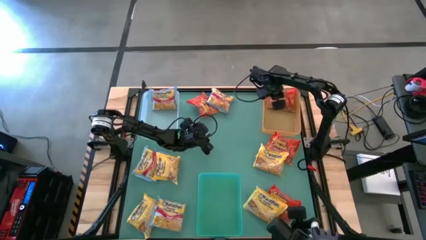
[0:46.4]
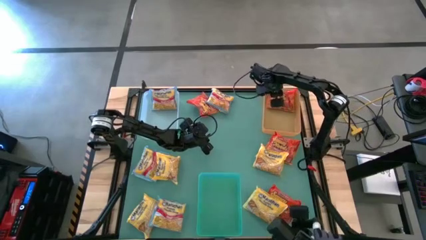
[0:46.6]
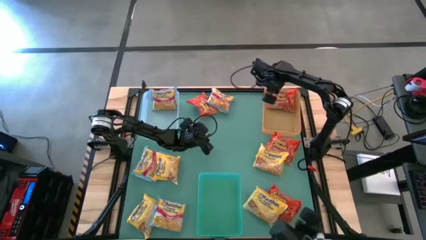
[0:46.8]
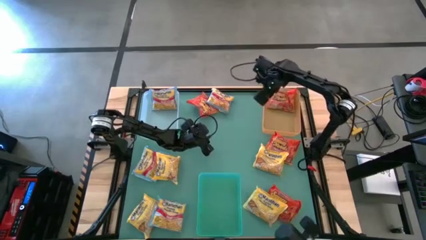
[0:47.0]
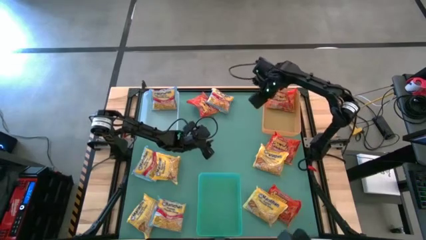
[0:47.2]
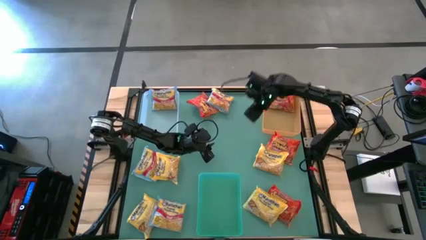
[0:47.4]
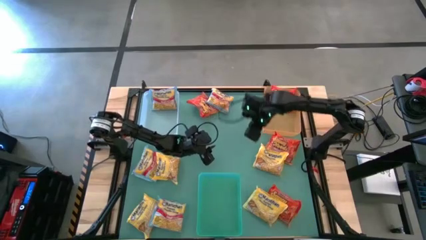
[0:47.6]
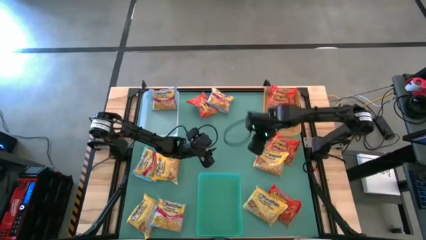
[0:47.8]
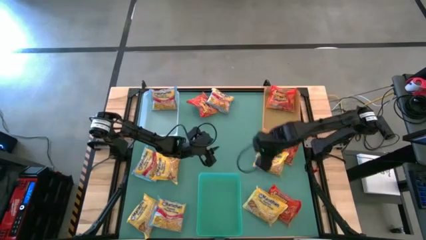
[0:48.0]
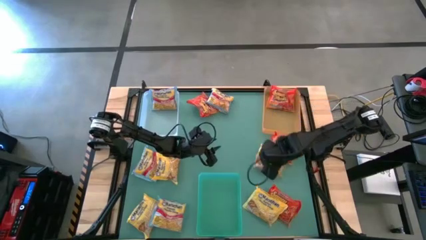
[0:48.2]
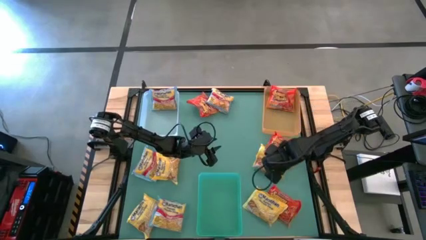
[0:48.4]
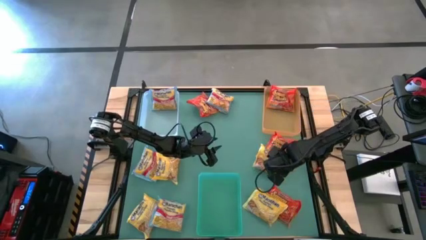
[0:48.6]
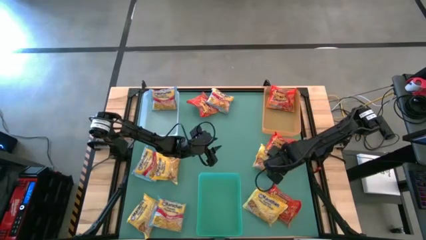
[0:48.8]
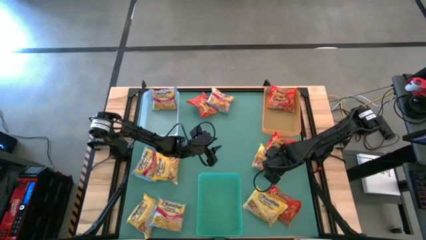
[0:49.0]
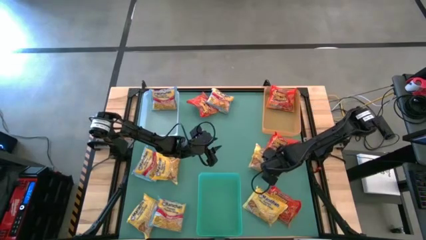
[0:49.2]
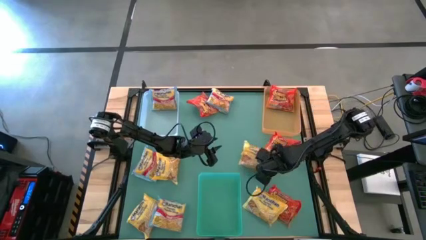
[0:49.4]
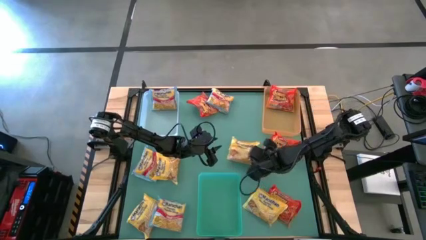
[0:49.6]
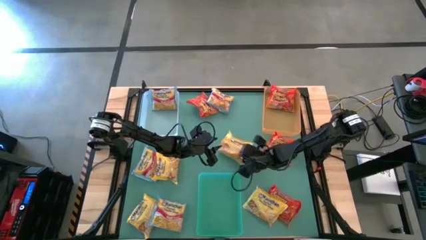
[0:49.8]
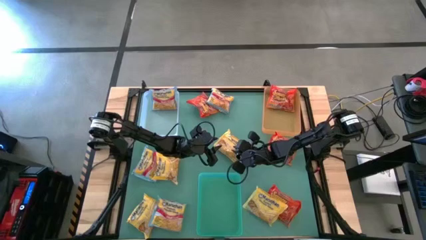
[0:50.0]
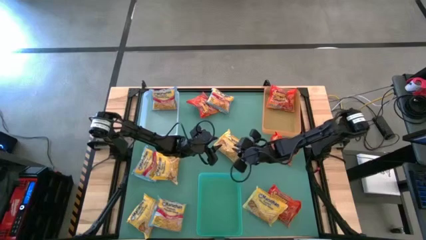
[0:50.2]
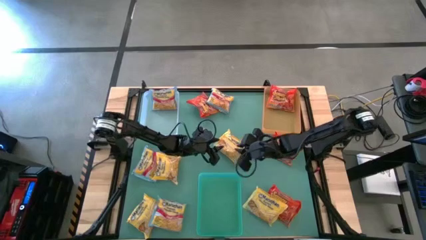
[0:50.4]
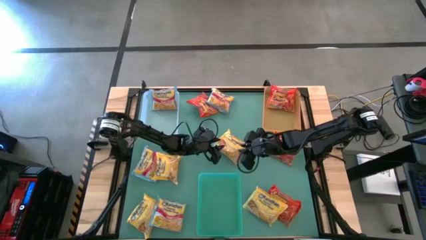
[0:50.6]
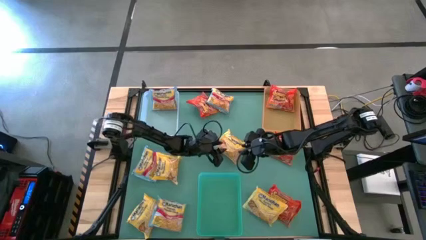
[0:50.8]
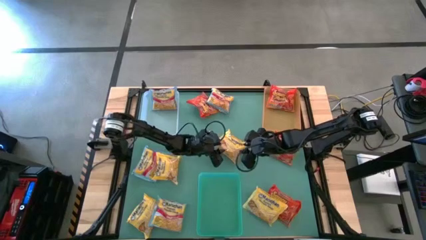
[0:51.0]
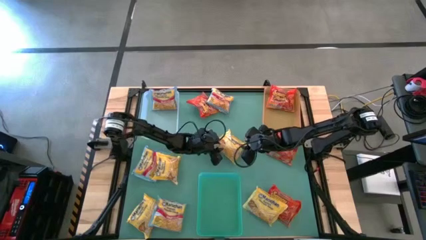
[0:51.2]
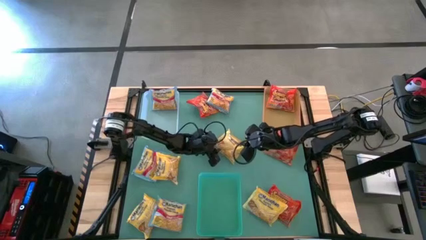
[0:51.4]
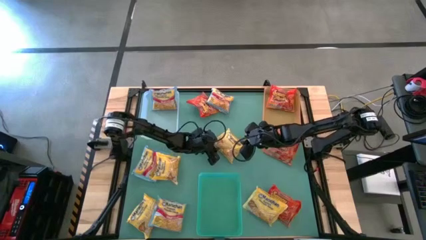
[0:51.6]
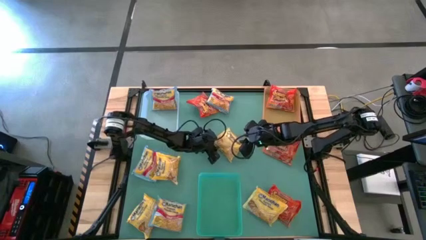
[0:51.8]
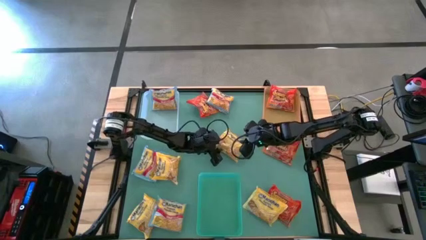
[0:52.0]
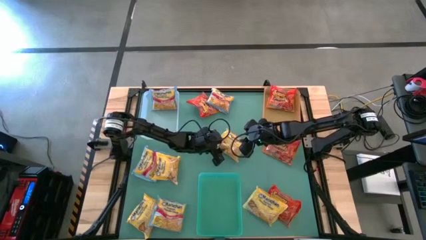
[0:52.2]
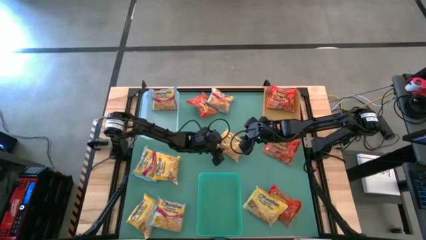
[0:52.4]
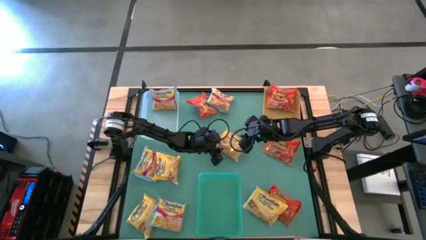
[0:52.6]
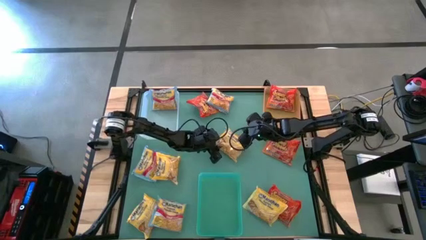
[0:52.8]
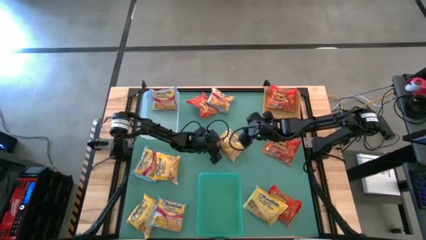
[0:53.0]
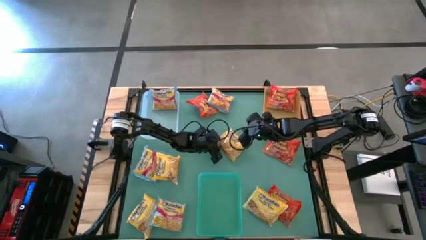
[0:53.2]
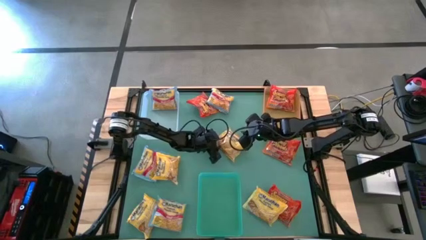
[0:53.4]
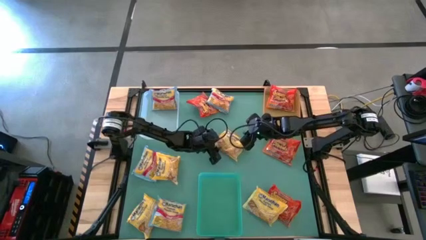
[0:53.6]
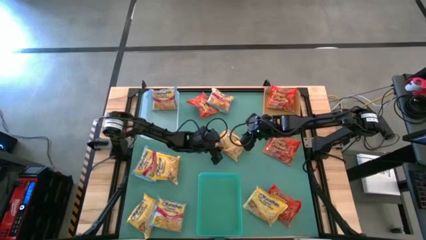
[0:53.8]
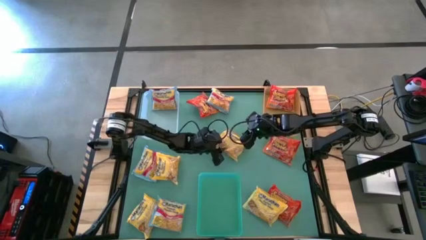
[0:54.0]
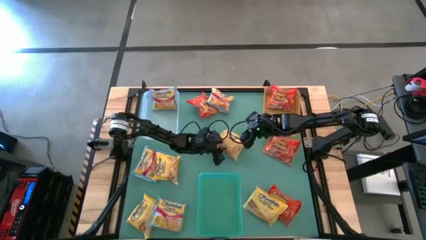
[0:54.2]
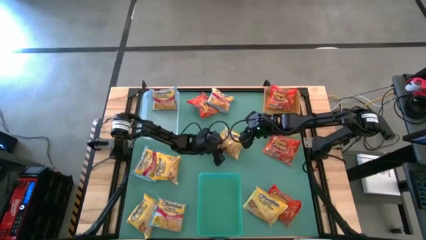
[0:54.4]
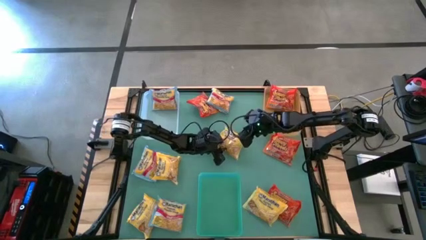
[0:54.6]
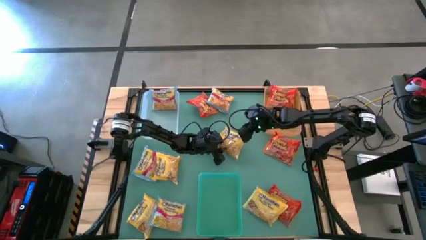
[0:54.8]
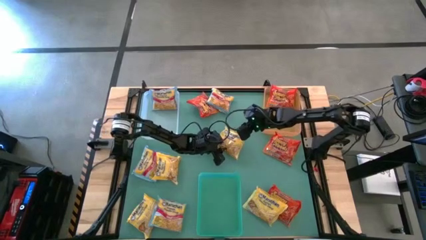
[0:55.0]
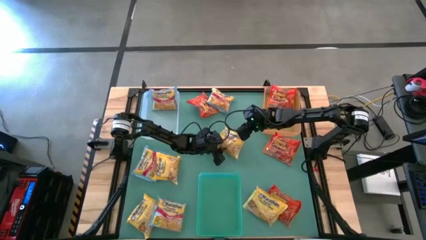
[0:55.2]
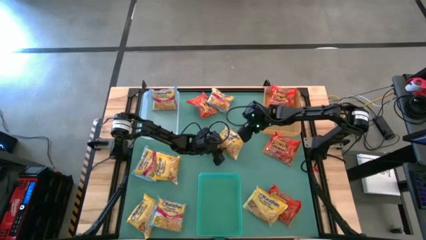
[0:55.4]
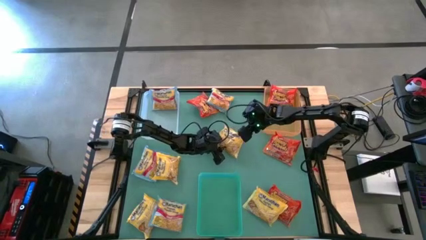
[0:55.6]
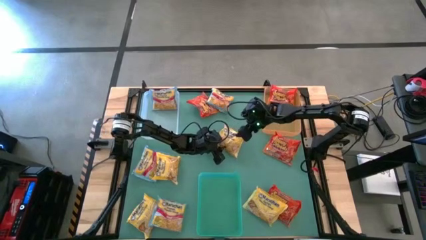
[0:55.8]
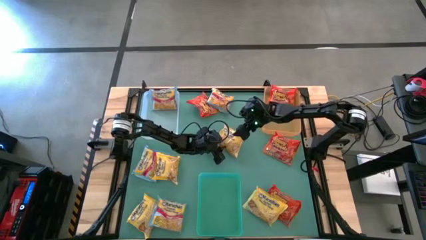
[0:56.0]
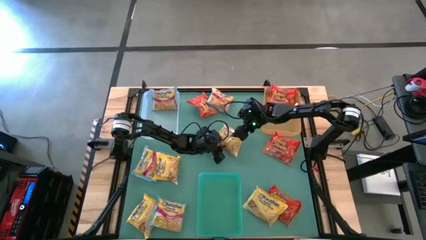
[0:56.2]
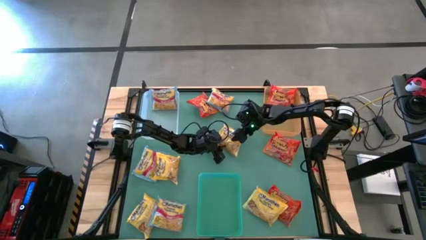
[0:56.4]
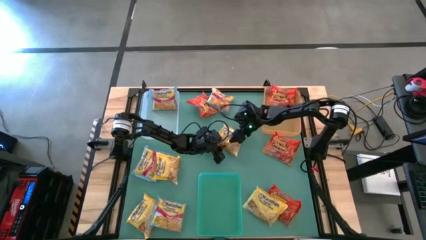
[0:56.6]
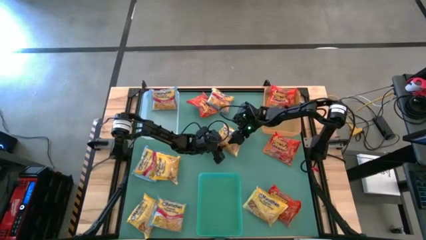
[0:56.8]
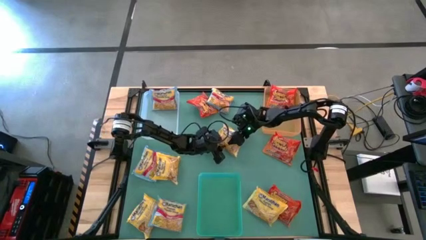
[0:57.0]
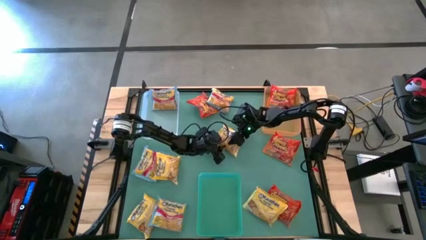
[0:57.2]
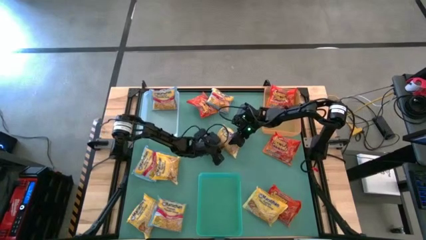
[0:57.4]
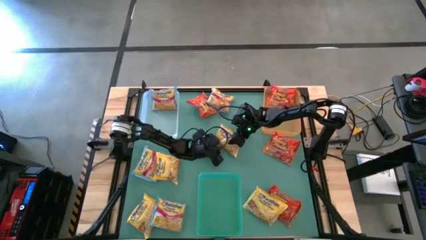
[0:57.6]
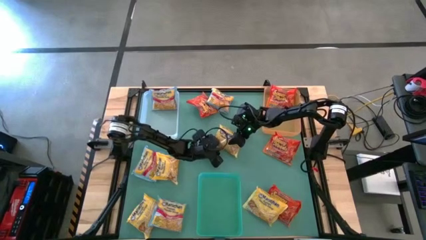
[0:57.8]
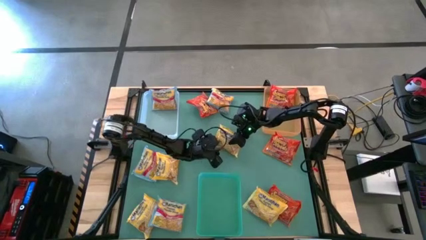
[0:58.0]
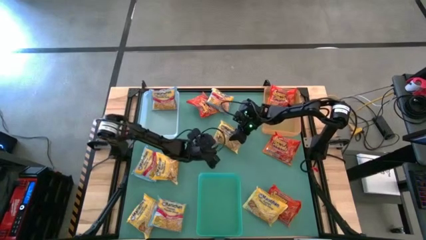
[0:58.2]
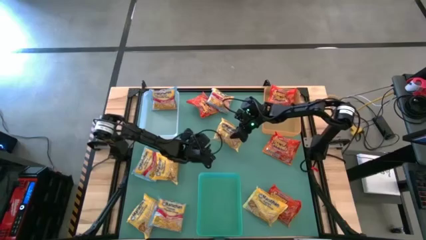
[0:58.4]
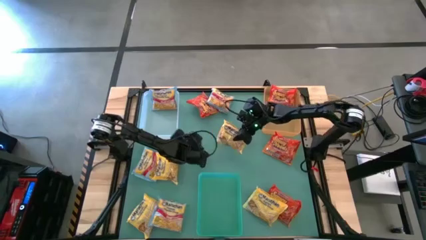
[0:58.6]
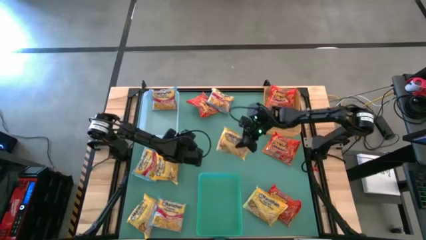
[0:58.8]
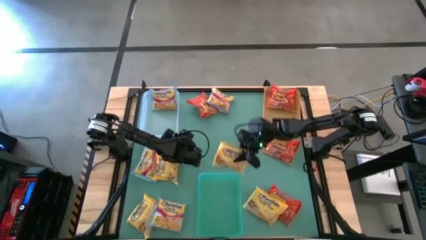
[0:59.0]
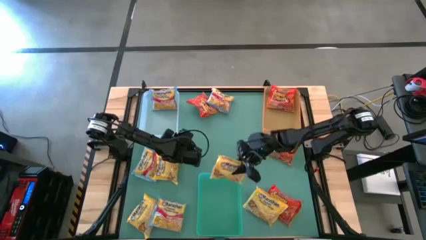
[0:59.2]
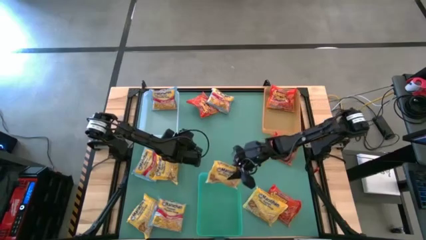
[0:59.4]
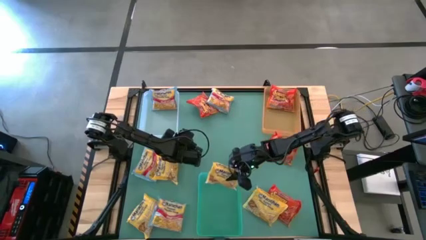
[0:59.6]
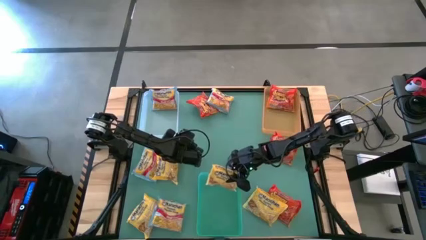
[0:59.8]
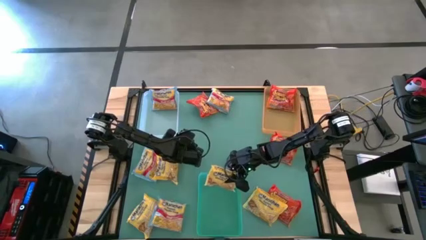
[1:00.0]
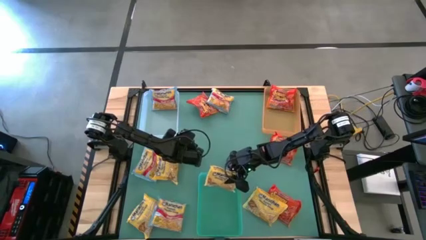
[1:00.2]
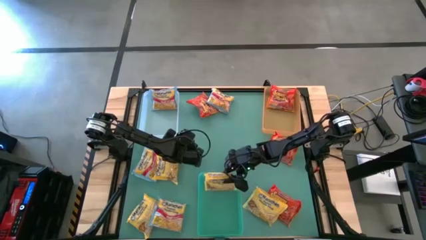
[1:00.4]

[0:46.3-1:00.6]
Task: Sort Maruchan noodles
Put the yellow noodle pack into the green bin
